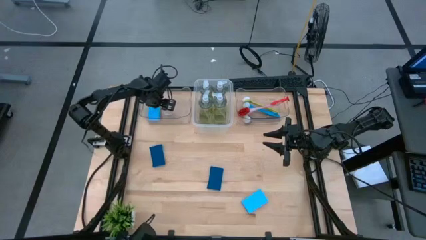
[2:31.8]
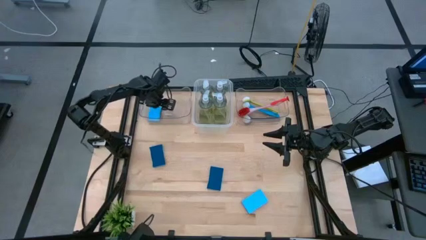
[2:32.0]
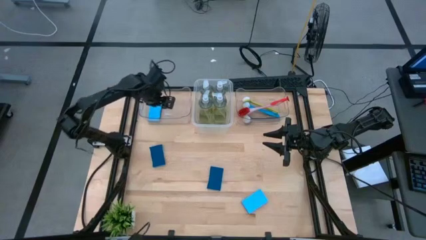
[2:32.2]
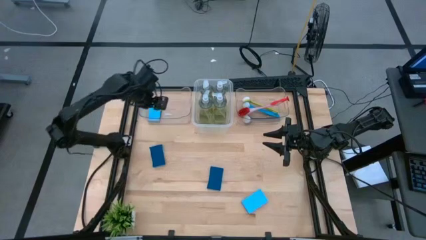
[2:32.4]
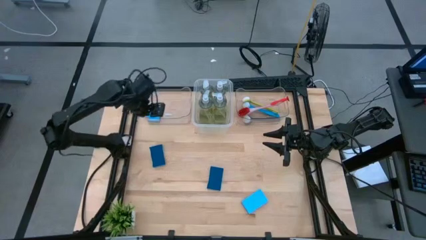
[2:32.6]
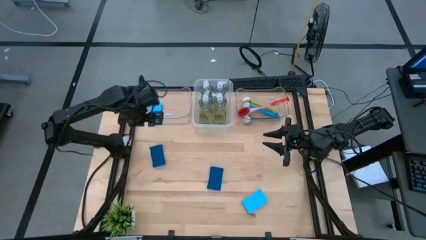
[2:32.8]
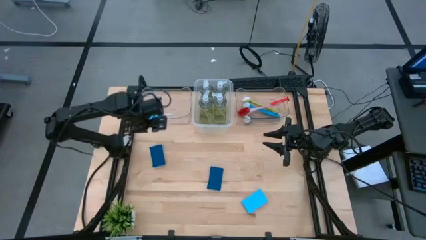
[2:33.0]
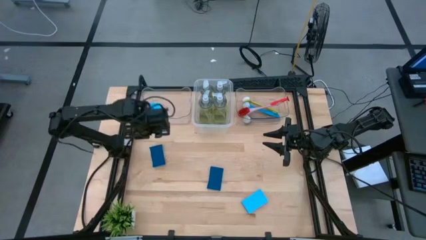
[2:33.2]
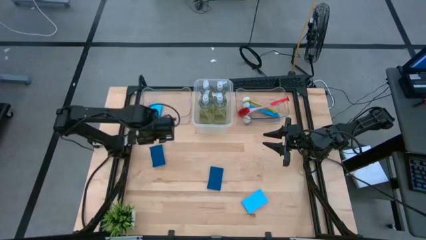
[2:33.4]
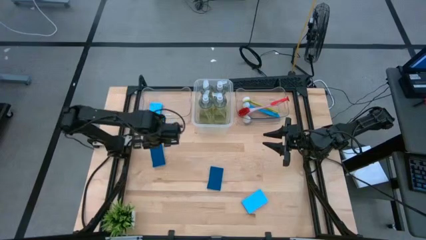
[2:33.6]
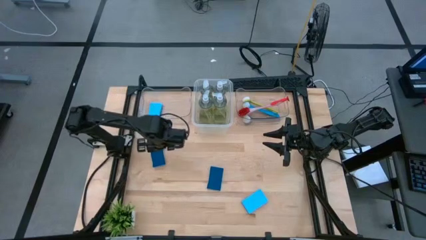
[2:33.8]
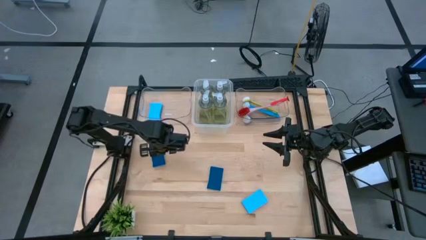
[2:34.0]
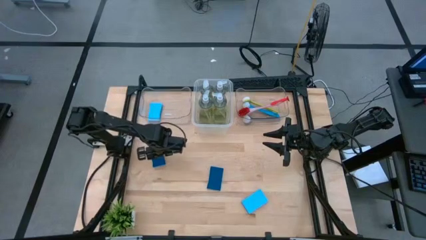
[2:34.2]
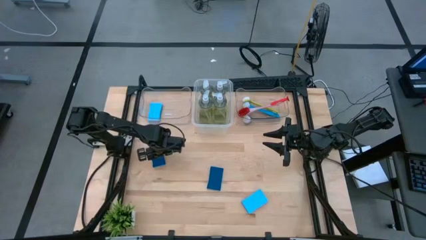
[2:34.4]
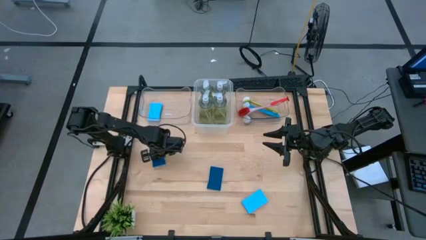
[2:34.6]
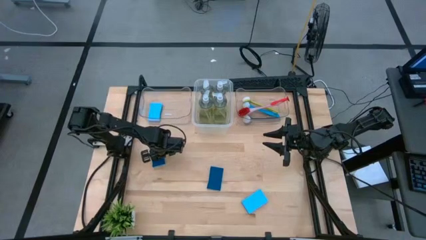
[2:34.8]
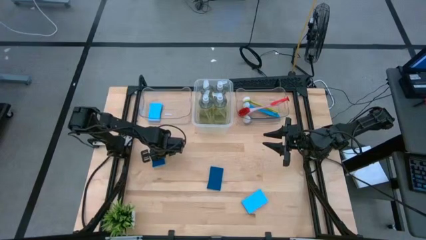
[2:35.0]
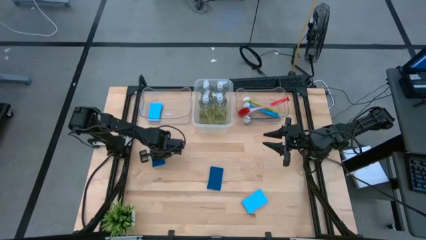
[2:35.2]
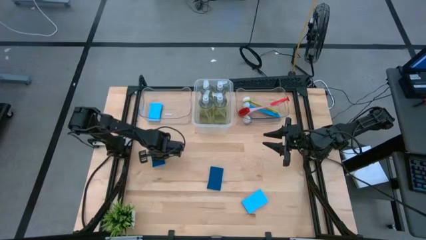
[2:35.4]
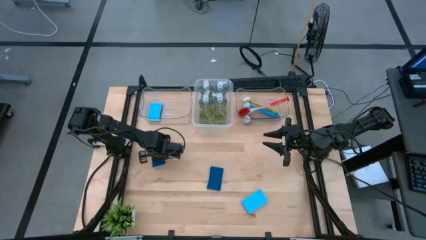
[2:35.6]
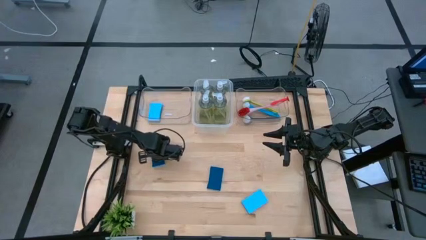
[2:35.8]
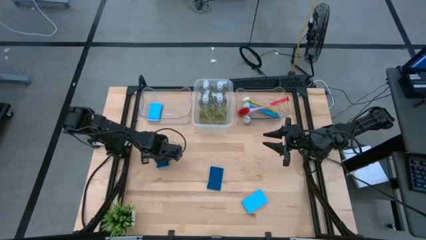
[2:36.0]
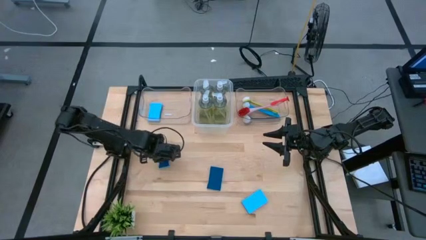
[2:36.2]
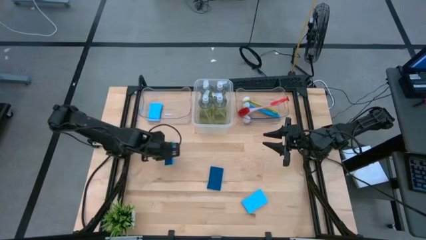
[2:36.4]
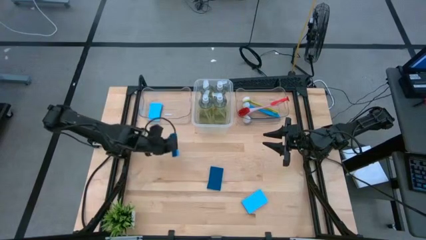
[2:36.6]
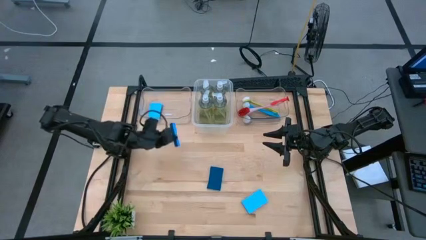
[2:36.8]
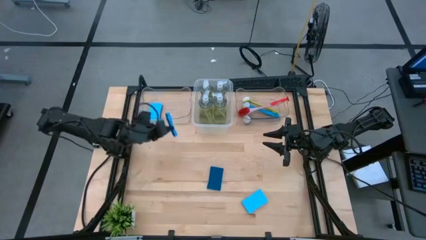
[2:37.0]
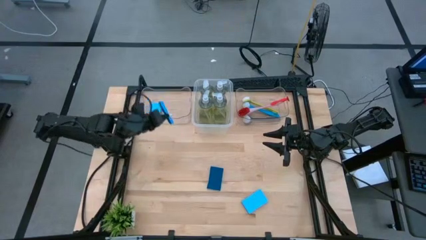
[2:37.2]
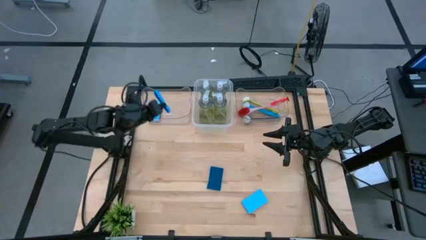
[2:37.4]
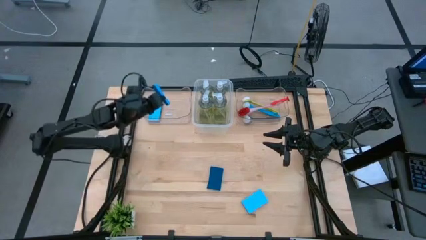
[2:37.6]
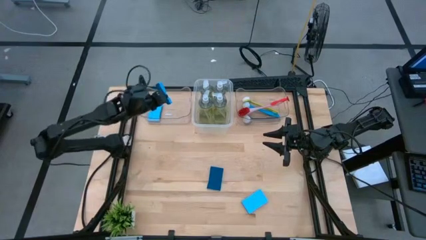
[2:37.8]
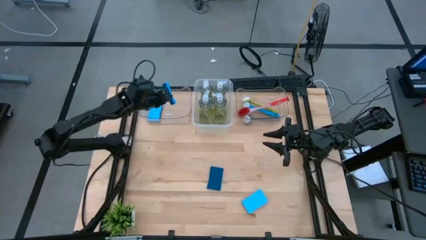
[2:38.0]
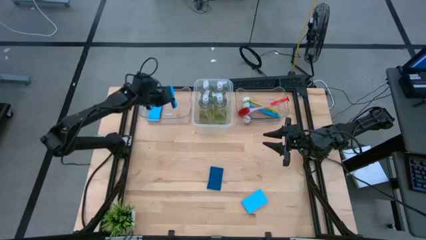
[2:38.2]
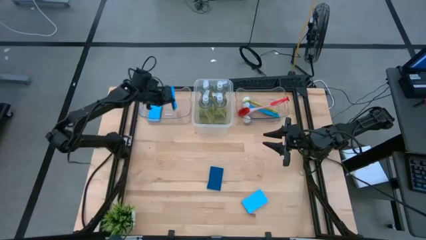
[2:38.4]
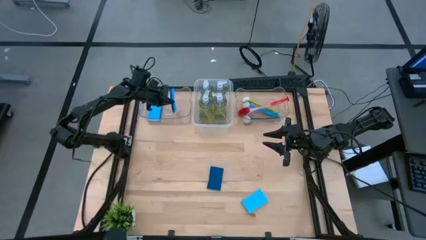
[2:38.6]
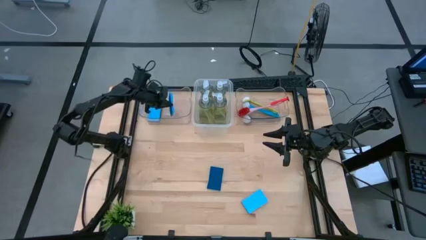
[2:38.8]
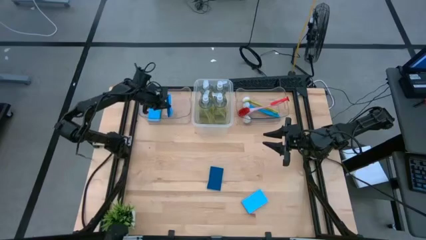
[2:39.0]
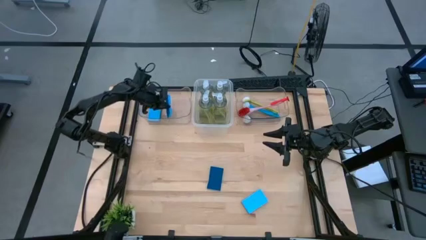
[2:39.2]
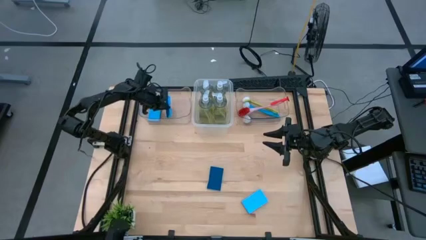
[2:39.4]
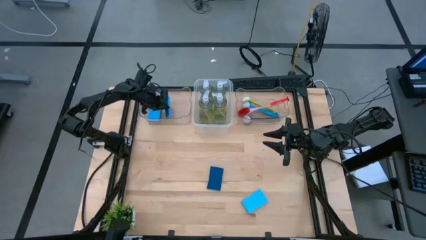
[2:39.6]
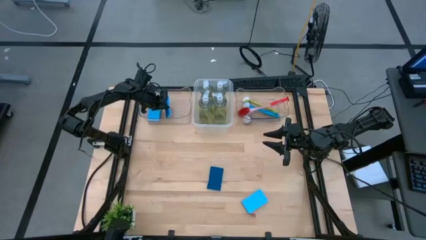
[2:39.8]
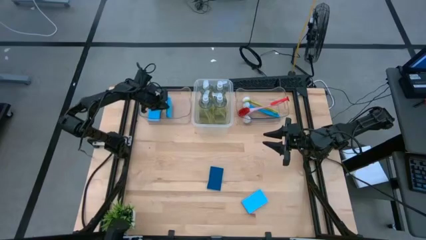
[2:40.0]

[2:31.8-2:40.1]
Task: Pick & Place Kitchen Sink Supplies
Put the blue sponge into the left transparent bin

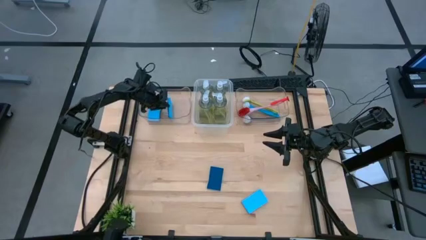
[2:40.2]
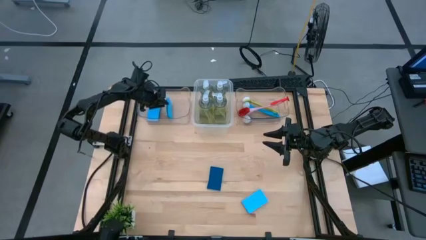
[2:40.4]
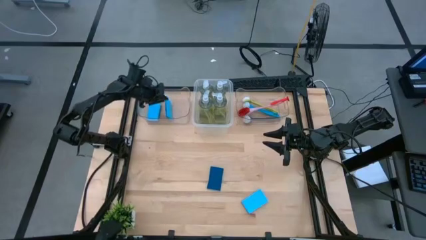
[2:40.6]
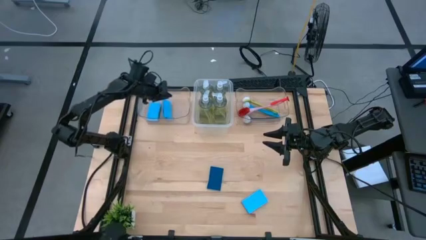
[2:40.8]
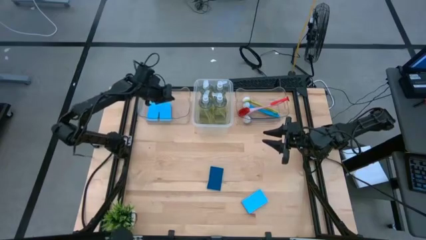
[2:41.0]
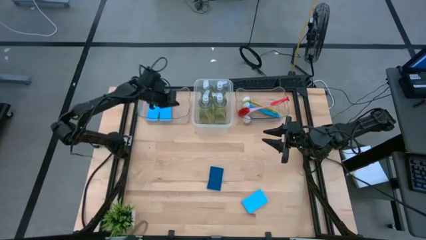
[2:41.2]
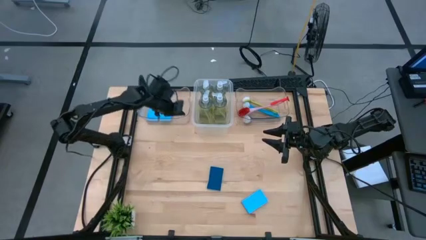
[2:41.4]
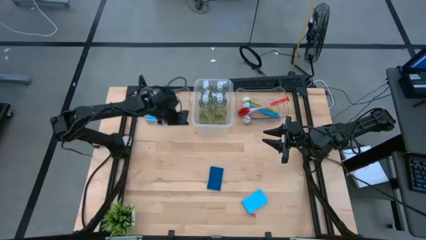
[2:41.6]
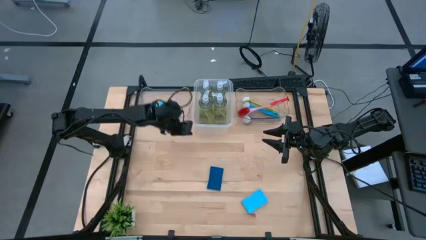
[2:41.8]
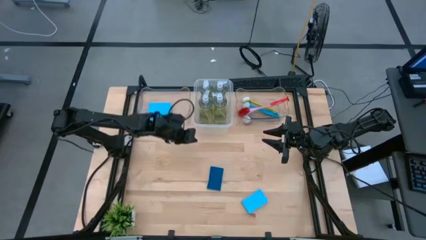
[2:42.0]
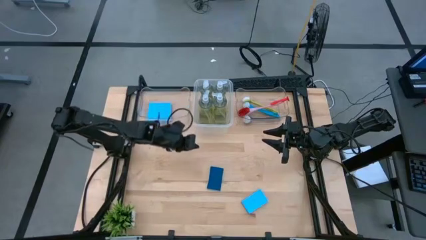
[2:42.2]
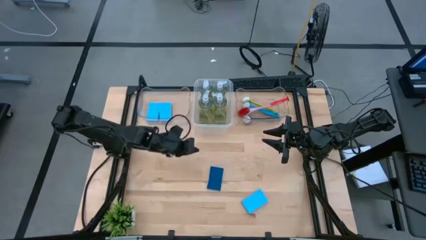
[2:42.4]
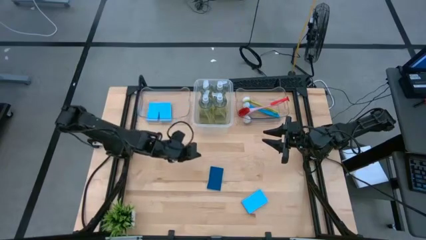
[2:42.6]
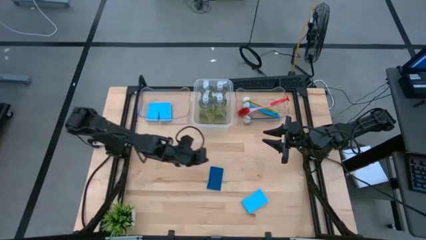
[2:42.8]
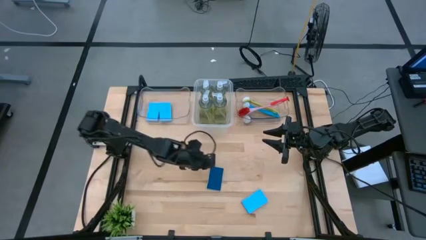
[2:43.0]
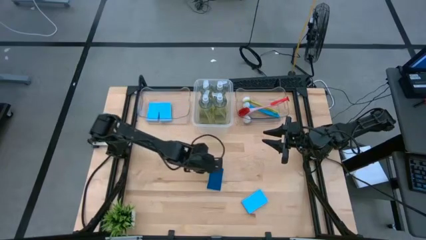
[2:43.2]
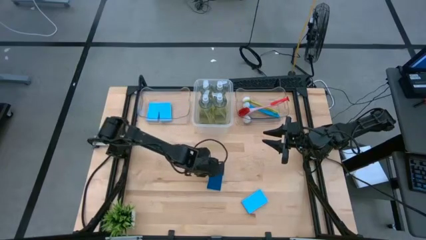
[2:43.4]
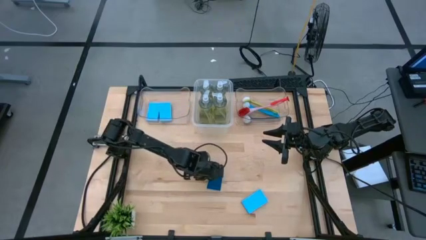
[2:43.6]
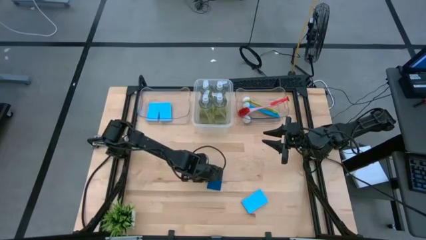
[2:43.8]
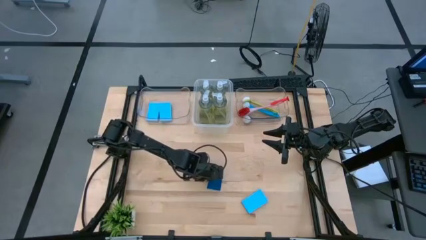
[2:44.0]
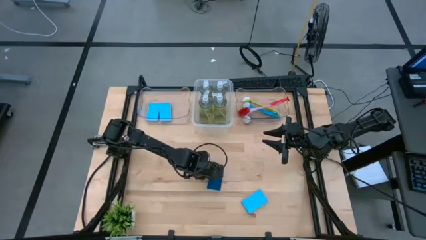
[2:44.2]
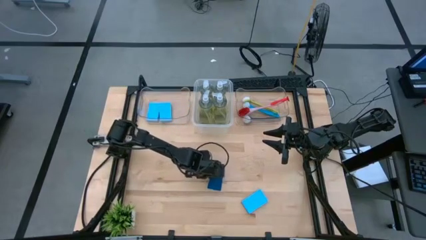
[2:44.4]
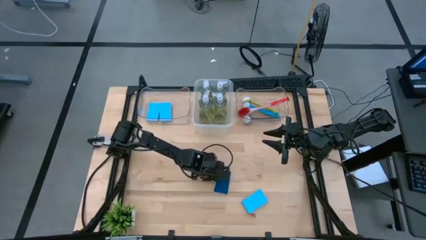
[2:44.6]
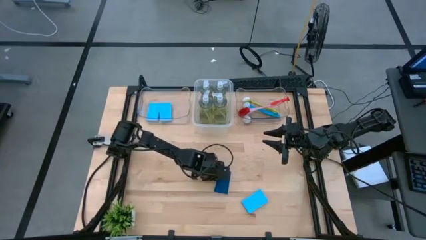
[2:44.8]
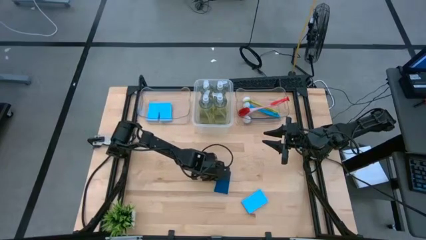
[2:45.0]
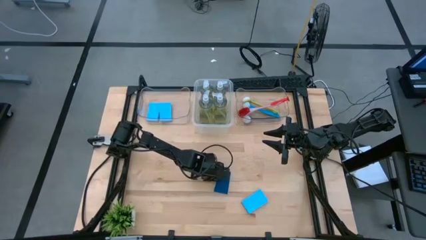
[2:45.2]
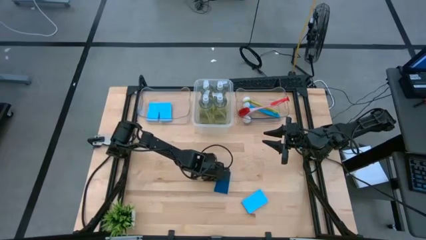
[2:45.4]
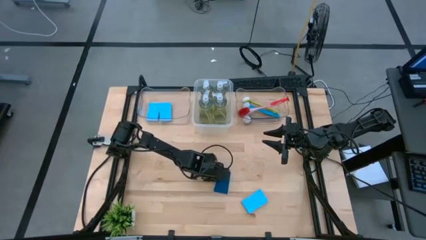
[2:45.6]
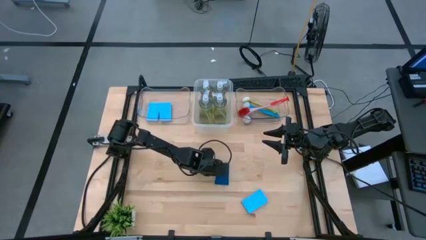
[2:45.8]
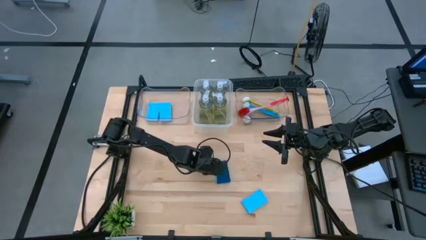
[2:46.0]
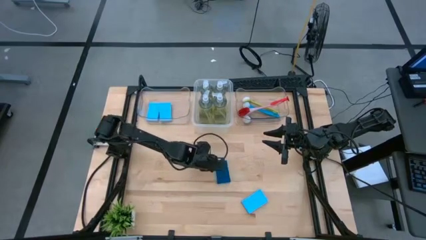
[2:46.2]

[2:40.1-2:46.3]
Put the blue sponge into the left transparent bin

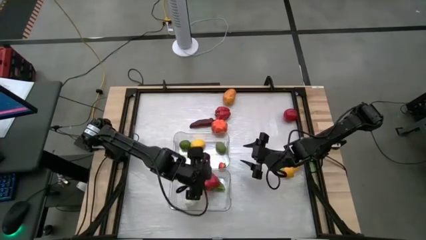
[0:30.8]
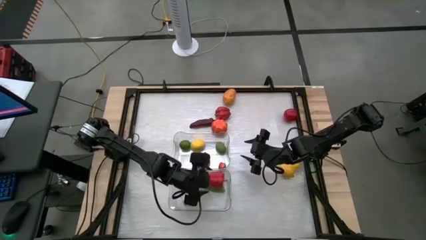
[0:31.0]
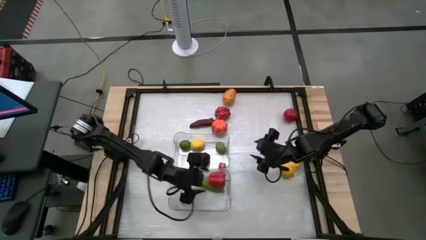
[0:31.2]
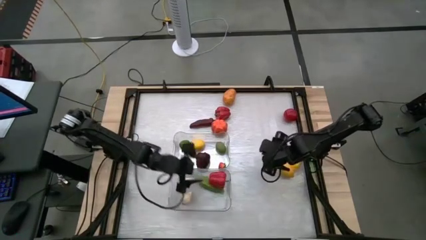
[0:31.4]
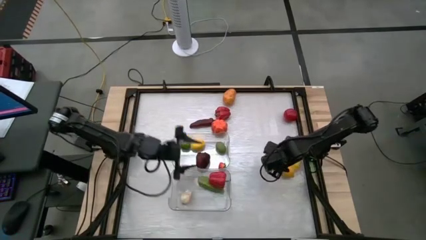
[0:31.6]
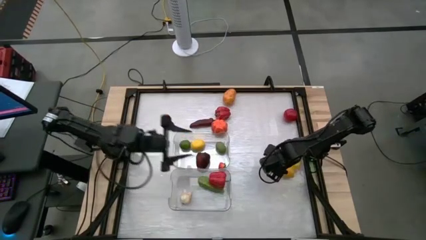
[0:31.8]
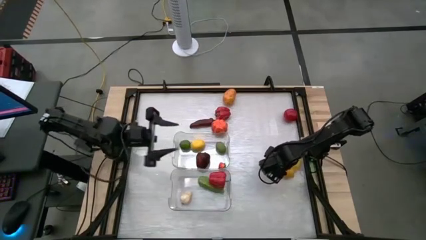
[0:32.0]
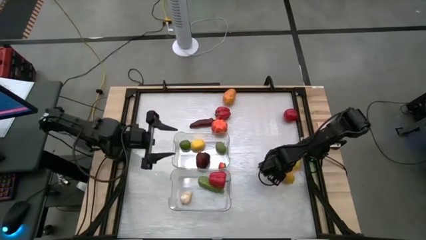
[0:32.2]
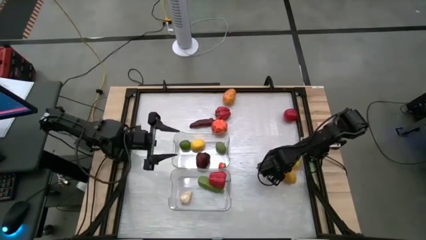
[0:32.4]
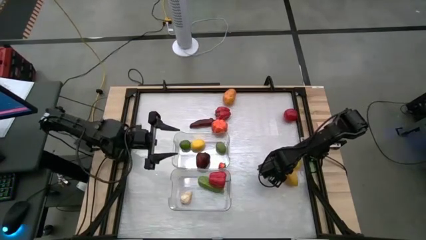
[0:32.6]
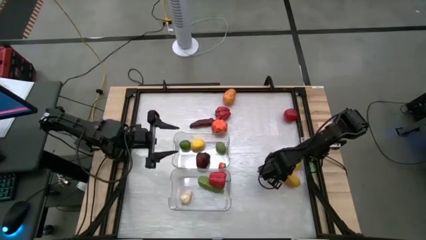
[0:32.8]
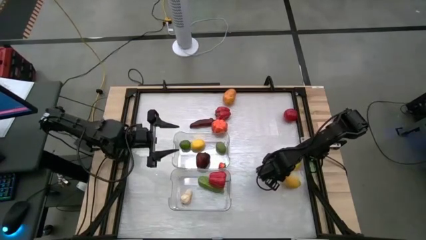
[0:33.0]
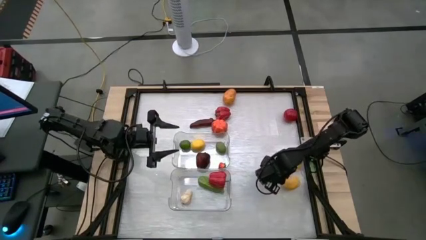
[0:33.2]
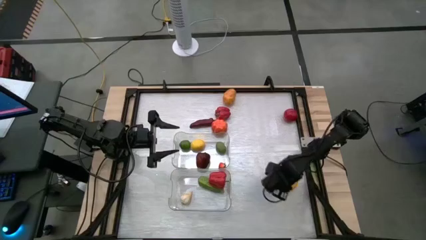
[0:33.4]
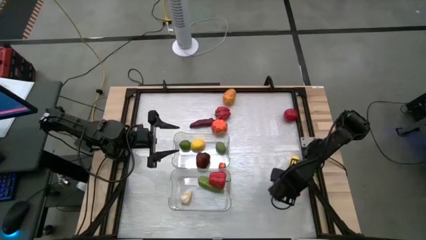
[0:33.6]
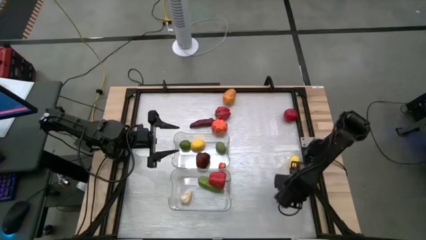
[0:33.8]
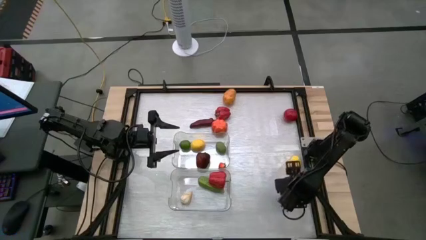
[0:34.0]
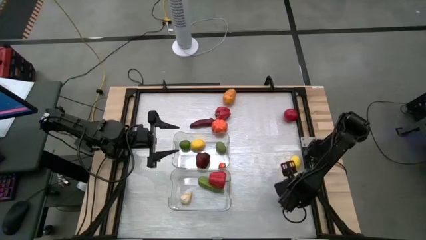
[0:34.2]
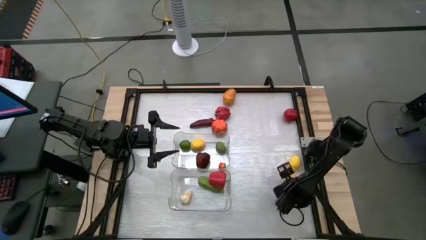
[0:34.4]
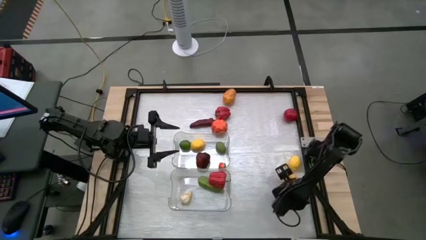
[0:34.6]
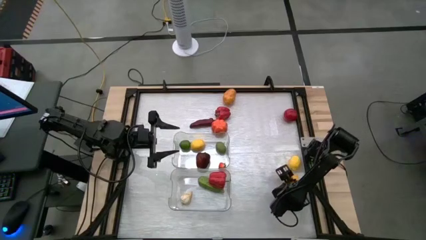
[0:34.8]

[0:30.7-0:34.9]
Task: Sort produce into baskets
Put the lemon into the top transparent bin
